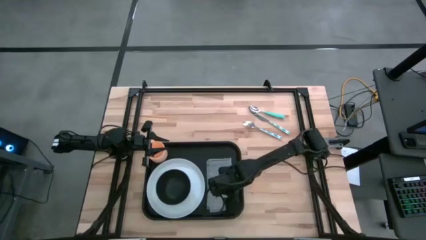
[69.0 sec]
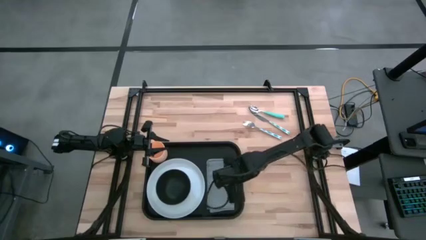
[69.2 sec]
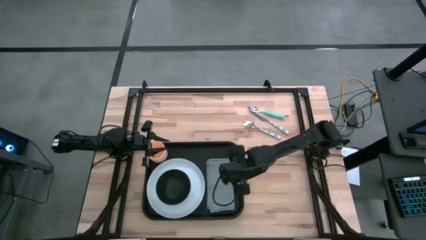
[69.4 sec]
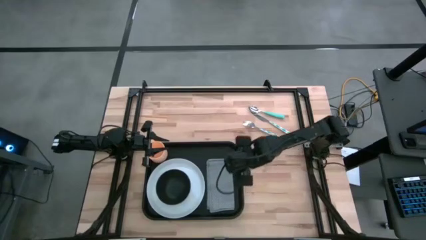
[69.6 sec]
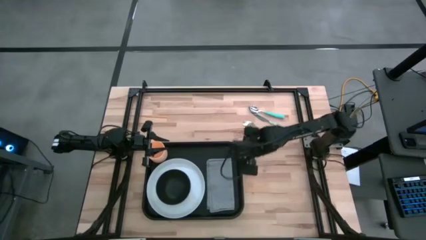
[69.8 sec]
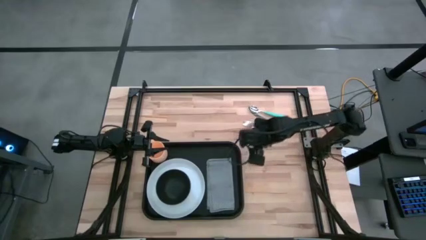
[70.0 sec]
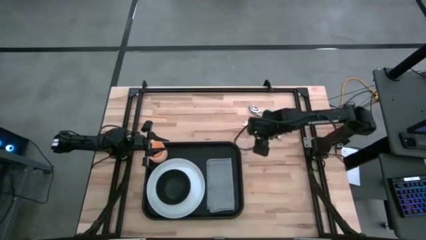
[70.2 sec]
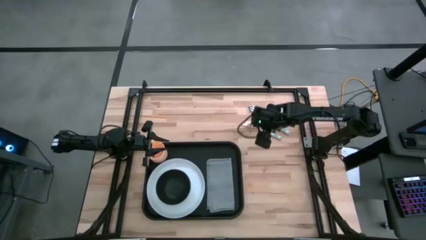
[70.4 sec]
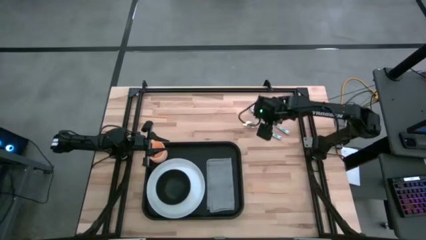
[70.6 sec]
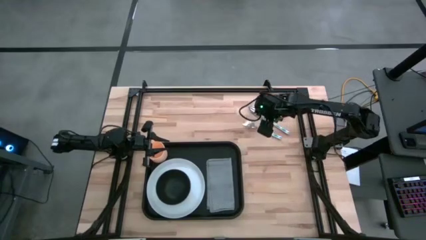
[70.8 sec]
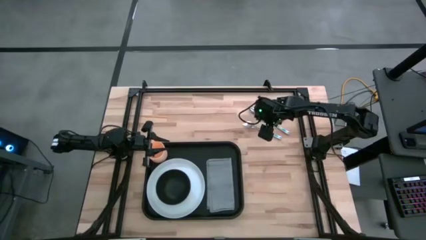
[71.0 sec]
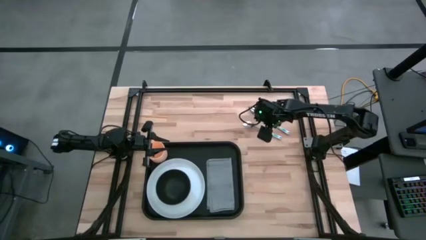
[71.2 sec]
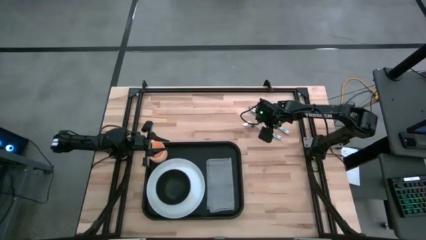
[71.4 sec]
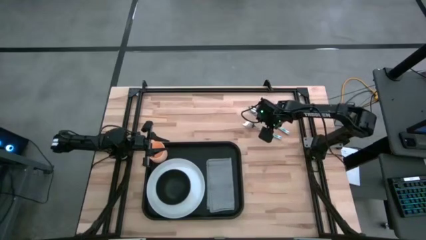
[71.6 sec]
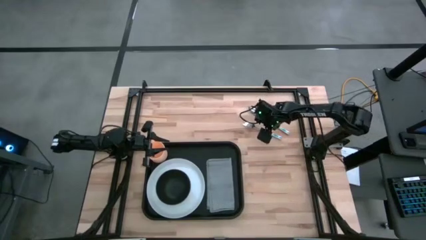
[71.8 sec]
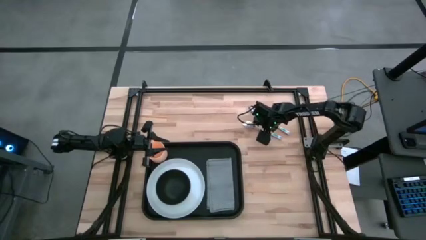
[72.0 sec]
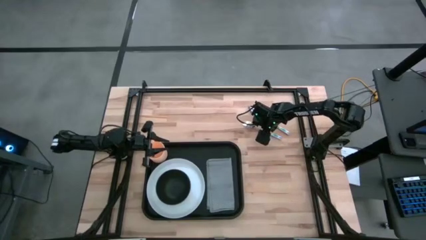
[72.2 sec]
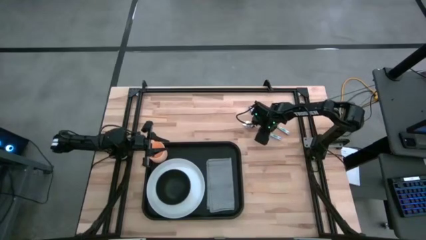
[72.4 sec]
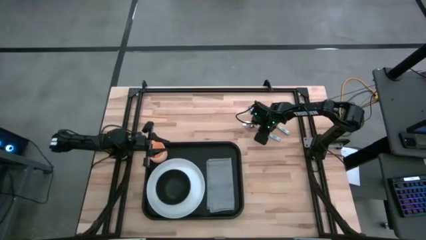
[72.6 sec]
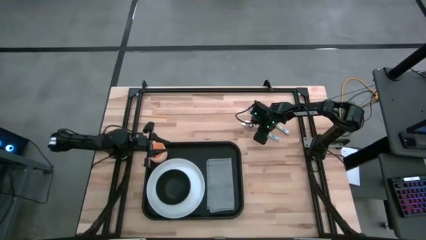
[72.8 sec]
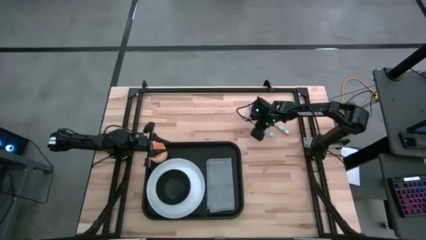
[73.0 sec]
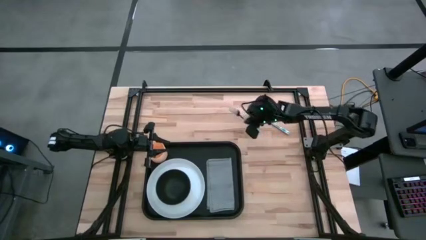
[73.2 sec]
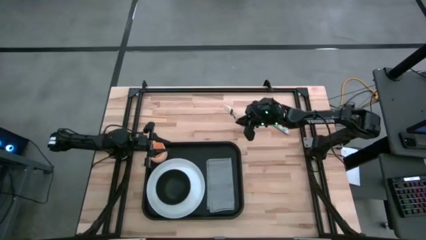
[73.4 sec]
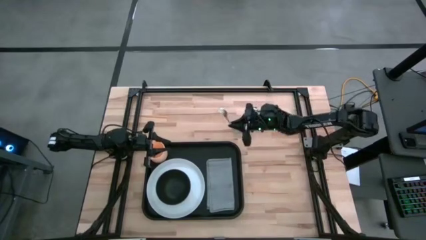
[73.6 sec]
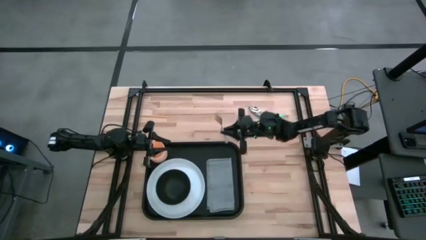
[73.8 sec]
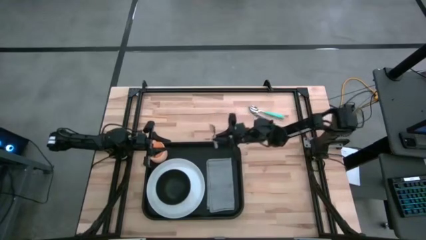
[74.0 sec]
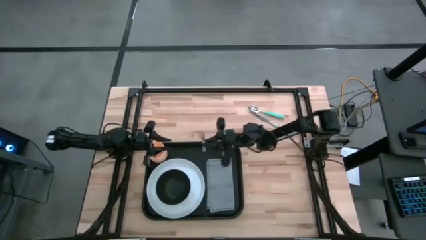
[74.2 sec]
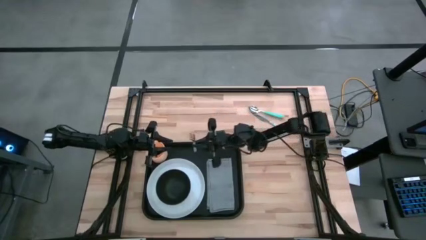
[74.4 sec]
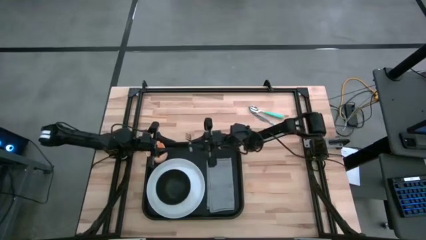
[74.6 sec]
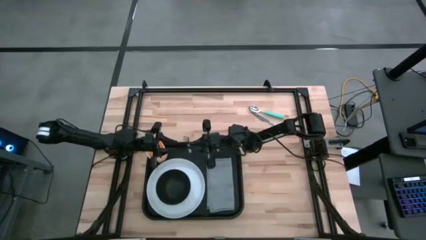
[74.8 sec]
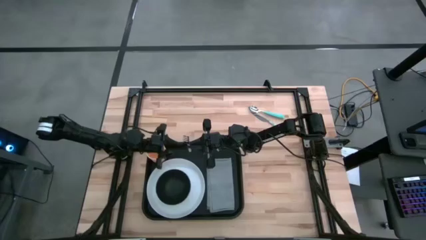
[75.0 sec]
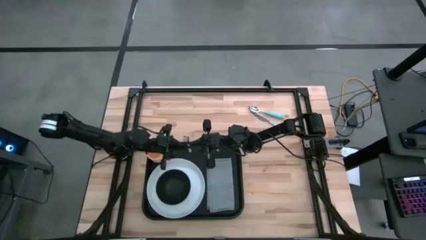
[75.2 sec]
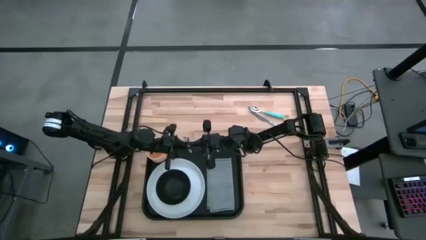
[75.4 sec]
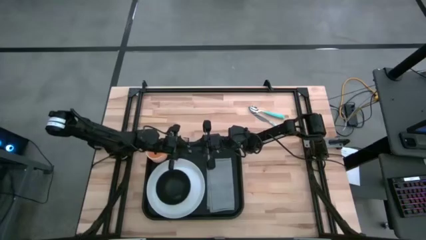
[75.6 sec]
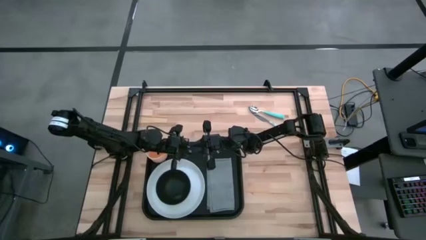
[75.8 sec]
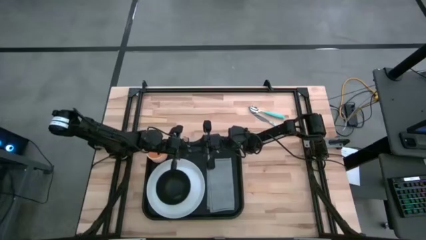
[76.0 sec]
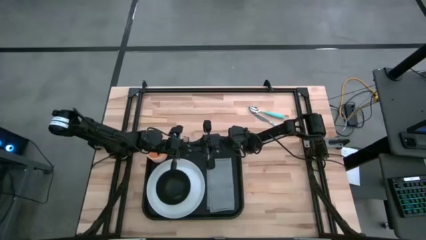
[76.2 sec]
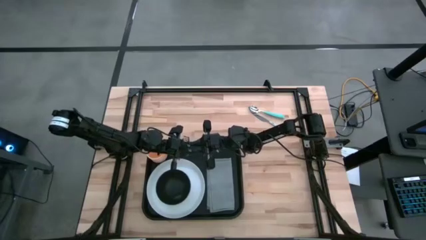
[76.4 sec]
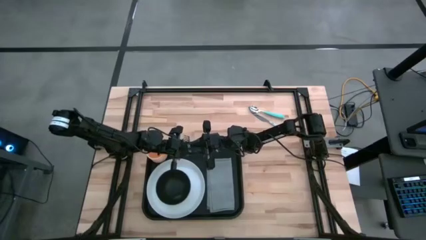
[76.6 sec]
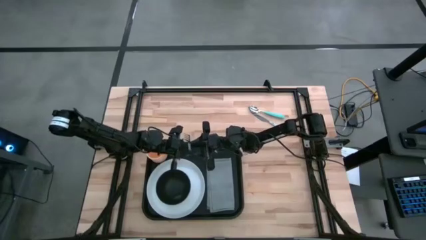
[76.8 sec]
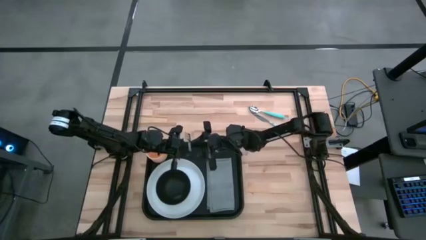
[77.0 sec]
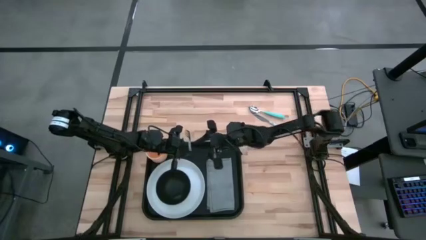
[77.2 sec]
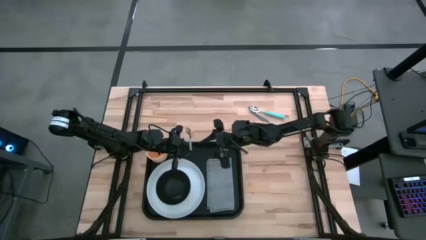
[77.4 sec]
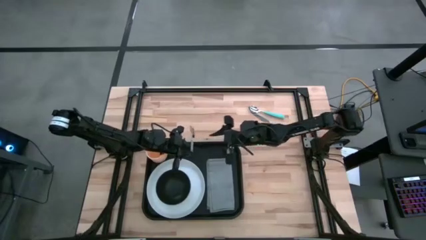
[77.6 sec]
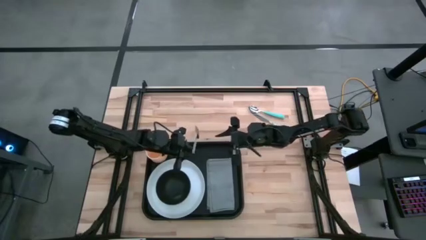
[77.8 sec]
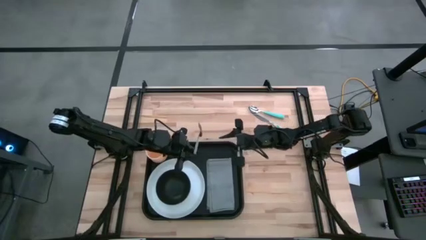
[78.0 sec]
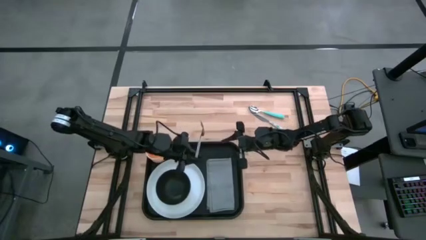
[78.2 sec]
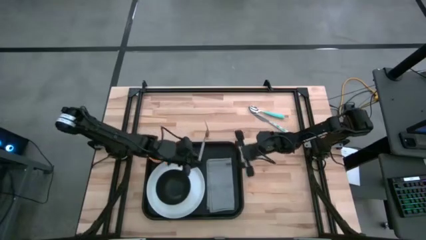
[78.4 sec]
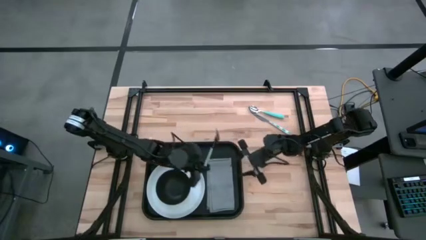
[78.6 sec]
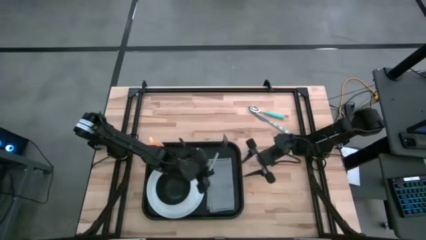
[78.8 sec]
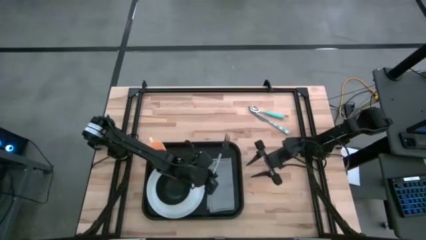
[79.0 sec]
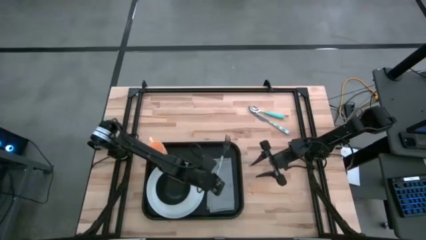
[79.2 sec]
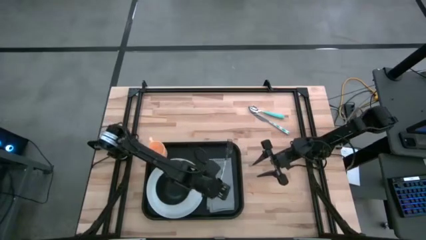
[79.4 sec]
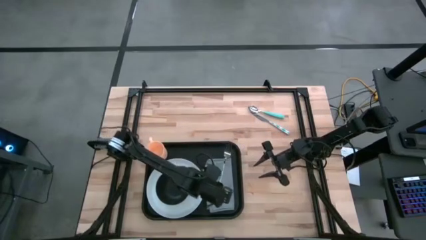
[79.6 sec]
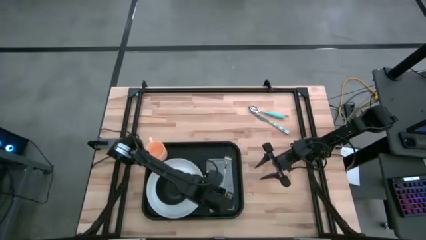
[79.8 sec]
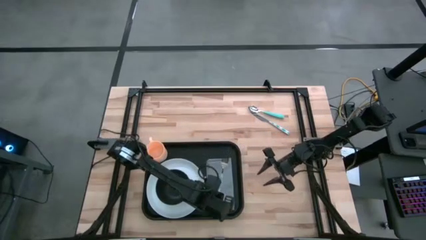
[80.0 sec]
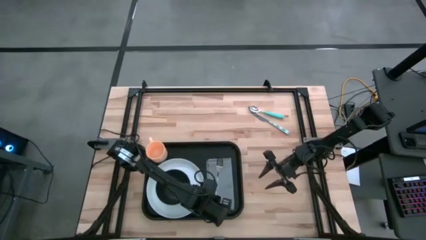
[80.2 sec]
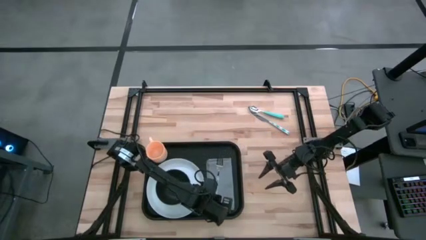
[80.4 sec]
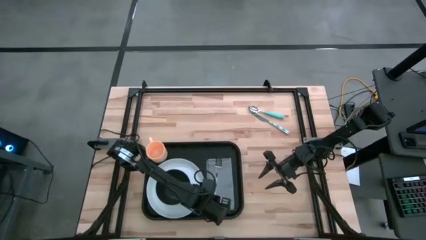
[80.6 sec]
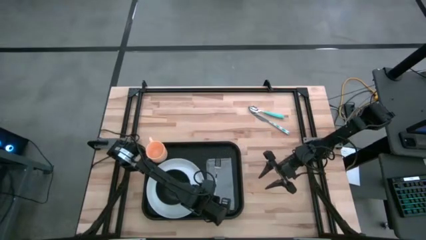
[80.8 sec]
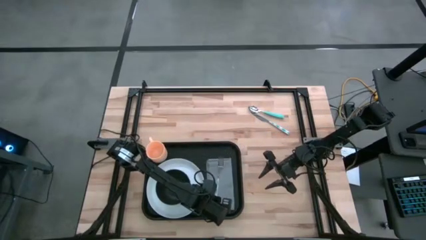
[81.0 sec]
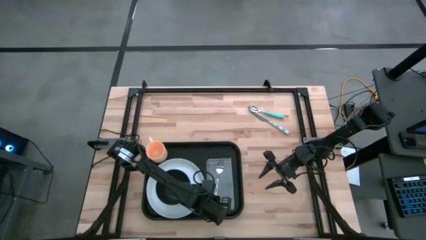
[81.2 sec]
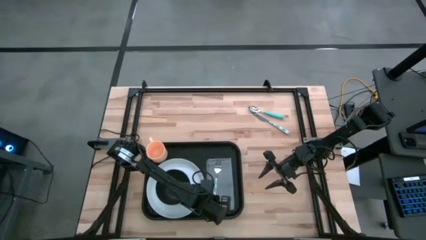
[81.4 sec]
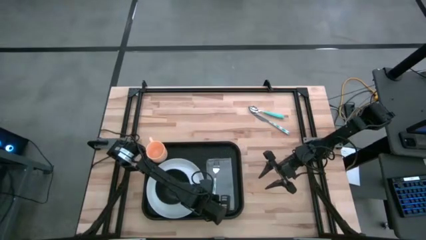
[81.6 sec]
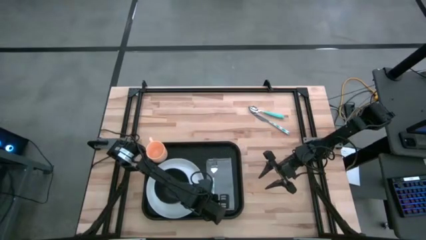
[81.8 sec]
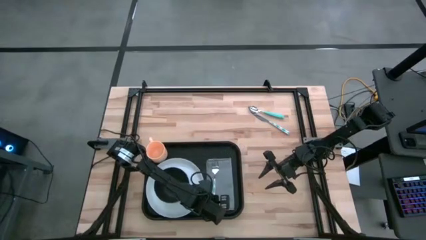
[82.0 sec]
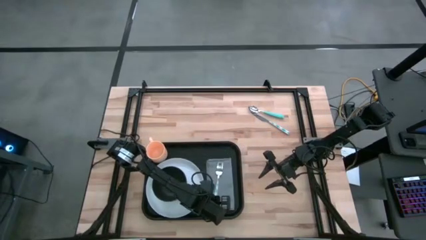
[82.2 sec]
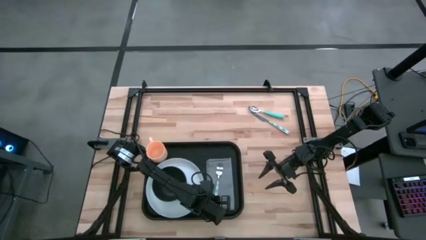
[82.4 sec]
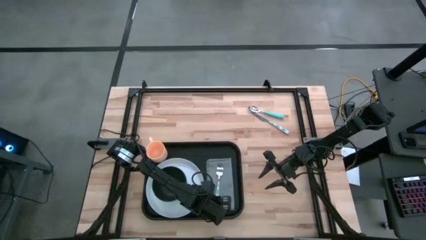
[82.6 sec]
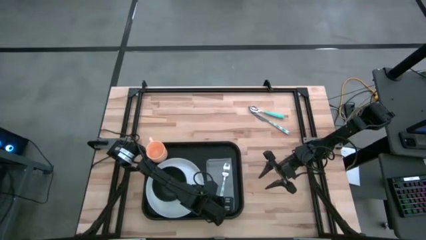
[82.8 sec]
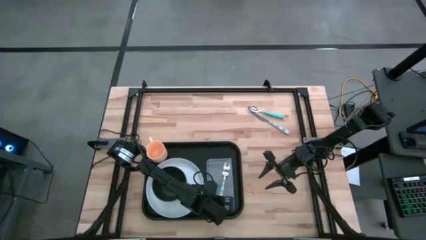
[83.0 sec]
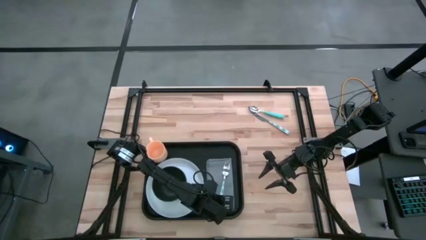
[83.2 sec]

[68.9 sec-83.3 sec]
Task: Set up tray
Put the green patterned fork on the gray napkin on the black tray
